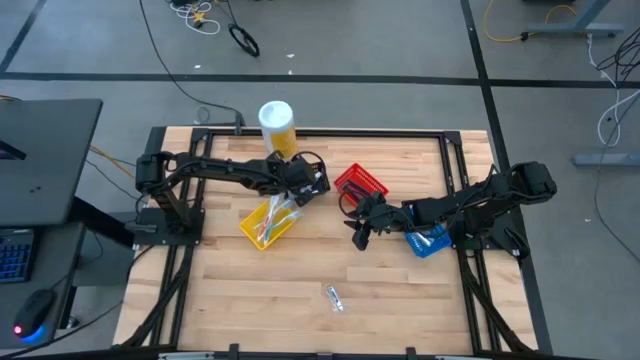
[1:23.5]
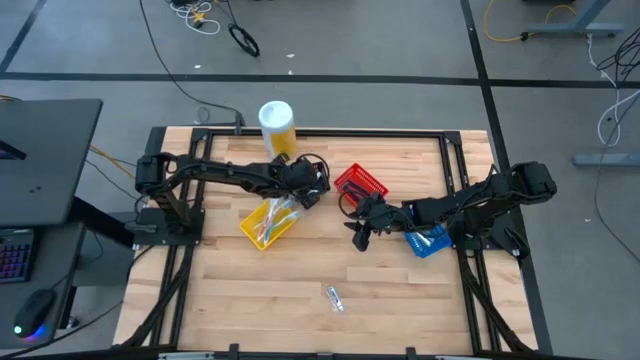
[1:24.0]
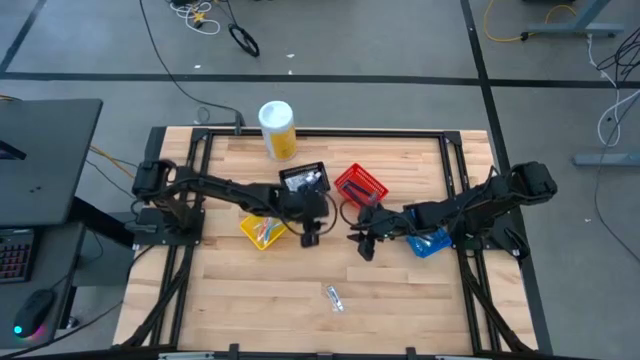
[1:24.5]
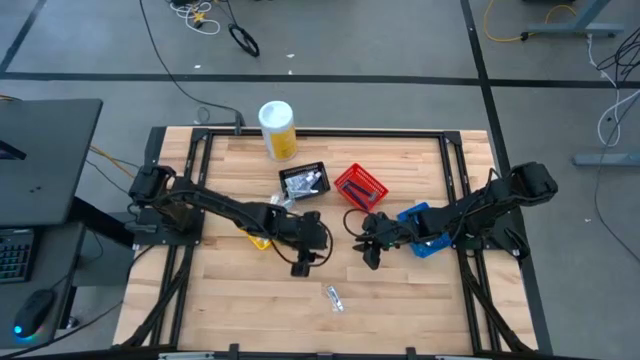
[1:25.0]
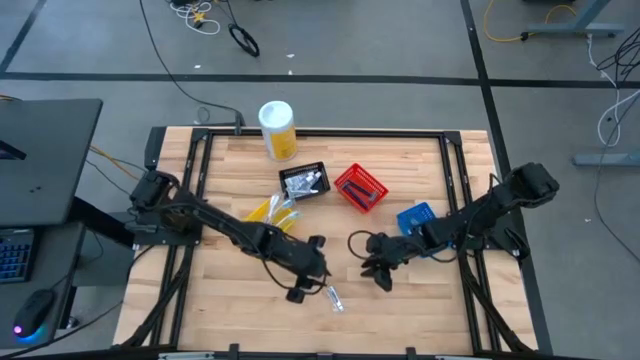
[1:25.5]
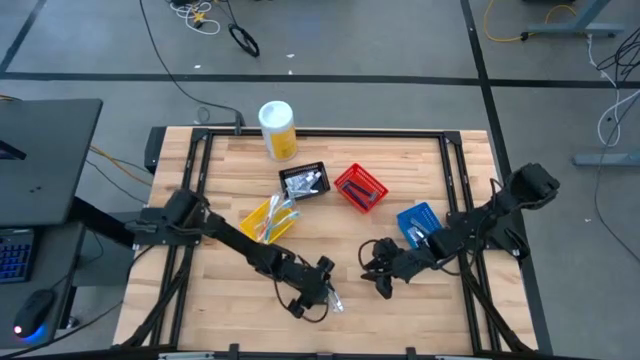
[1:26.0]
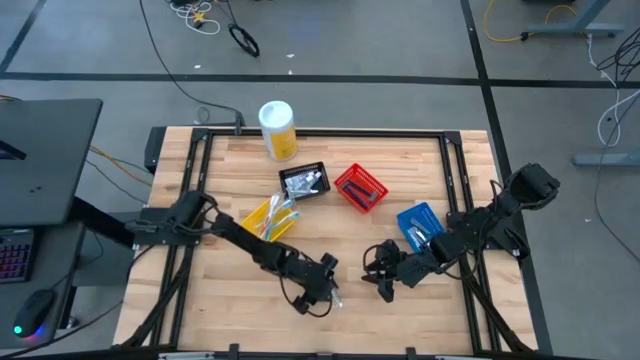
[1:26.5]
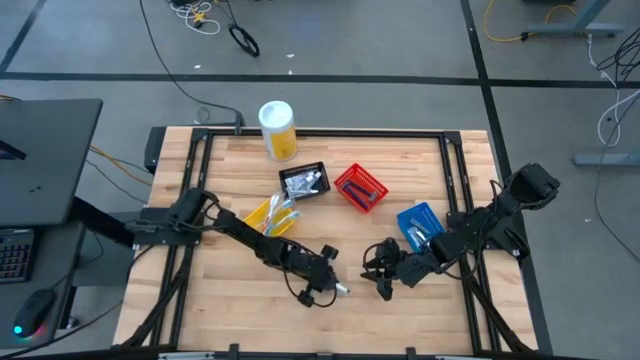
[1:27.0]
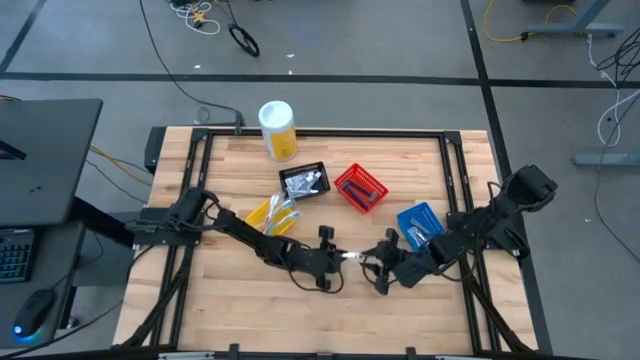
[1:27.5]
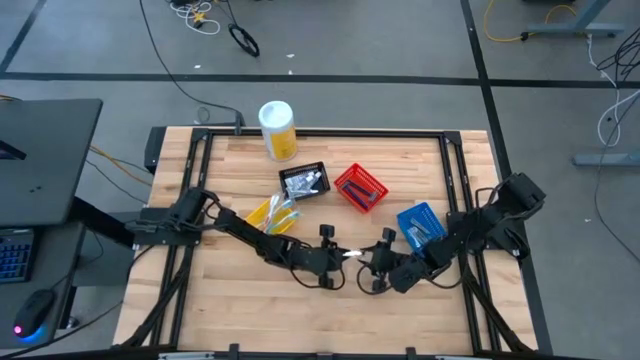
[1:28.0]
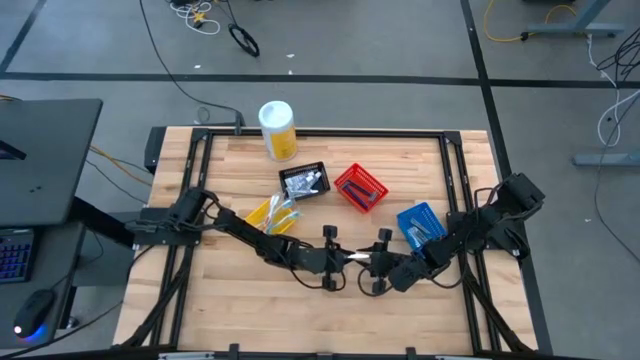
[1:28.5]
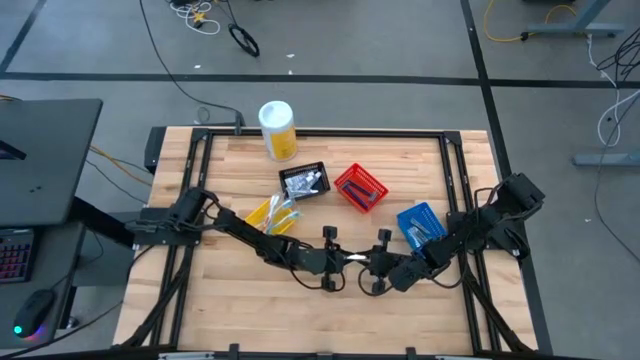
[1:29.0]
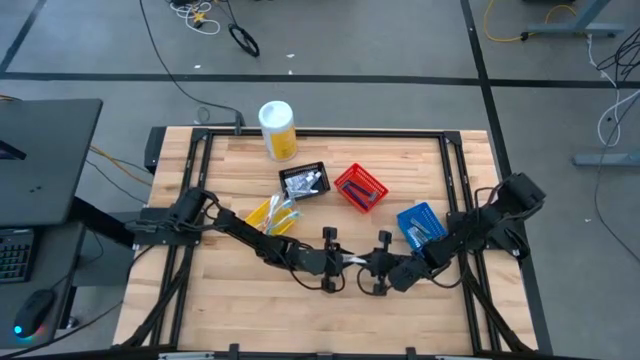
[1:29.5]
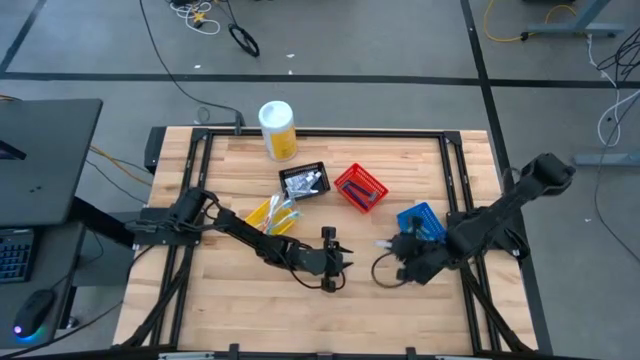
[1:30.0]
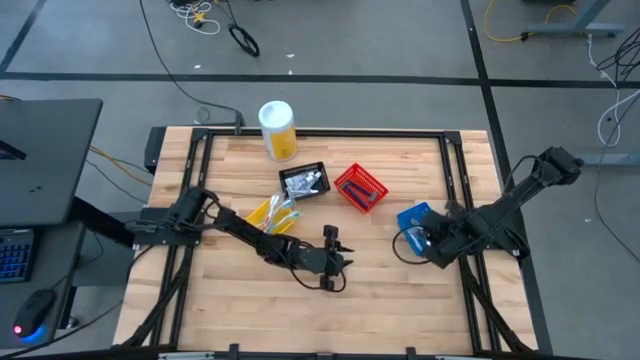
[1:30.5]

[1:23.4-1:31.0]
Task: Pick & Place Travel size toiletries
Put the silver nail cutter into the blue basket

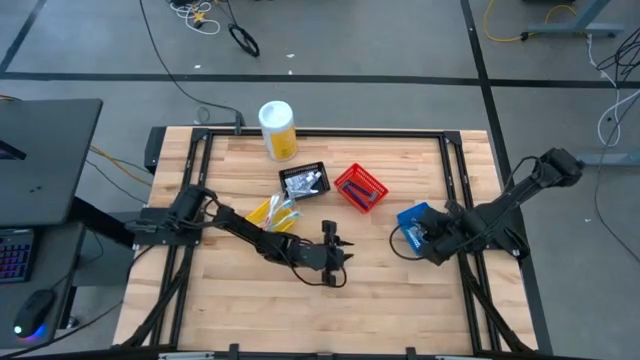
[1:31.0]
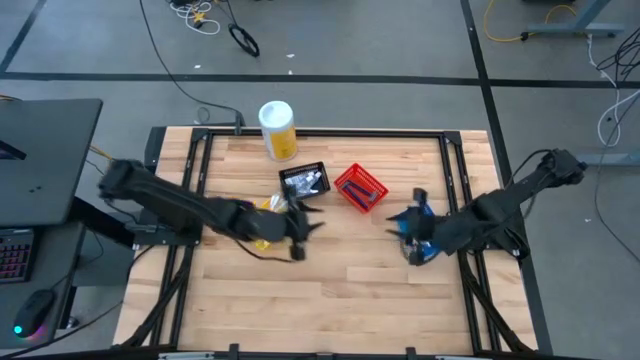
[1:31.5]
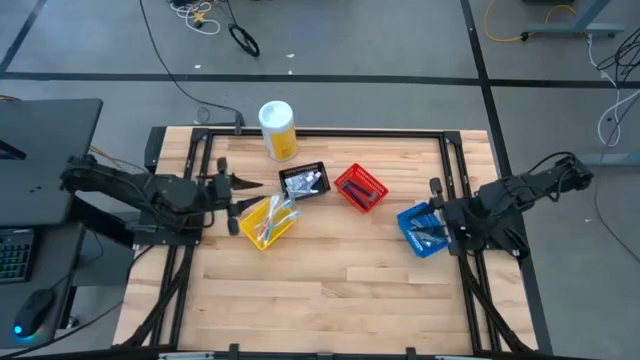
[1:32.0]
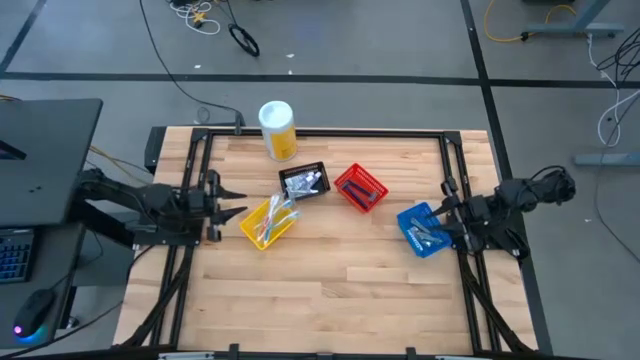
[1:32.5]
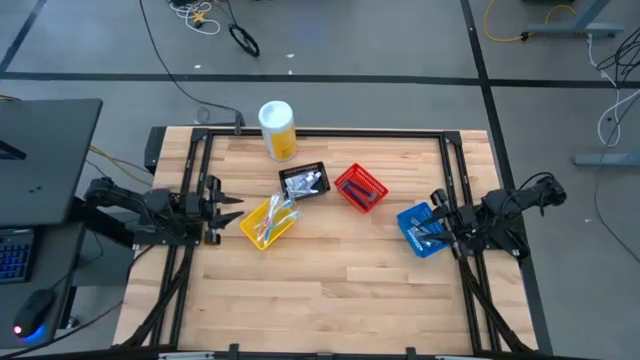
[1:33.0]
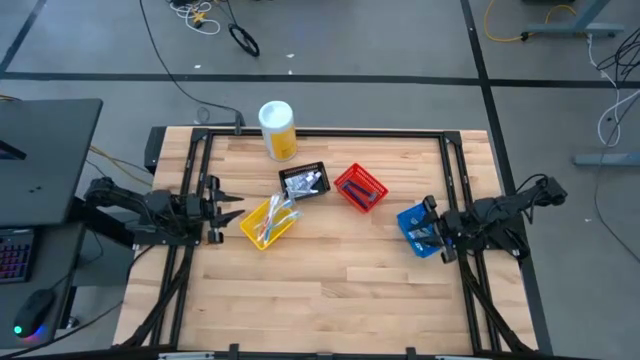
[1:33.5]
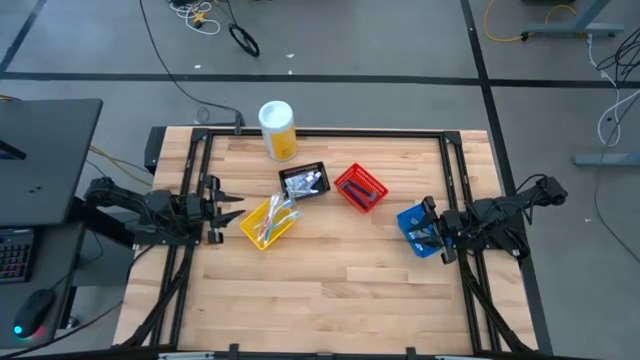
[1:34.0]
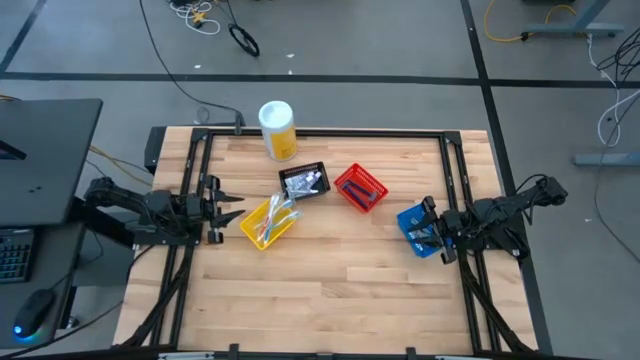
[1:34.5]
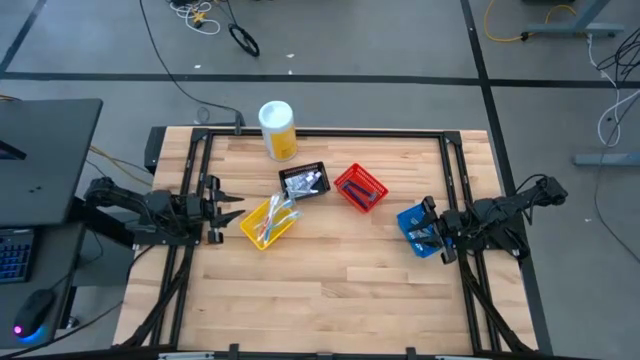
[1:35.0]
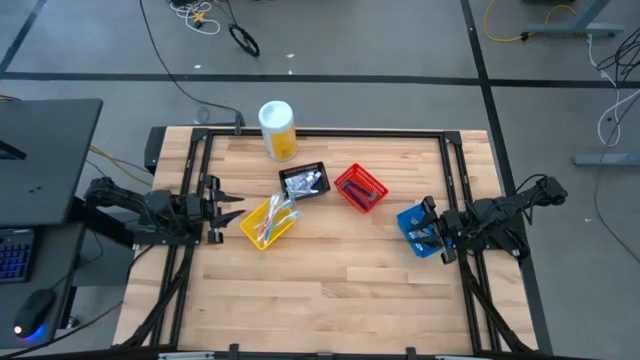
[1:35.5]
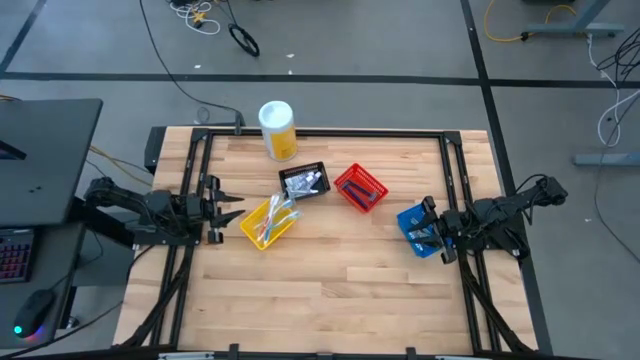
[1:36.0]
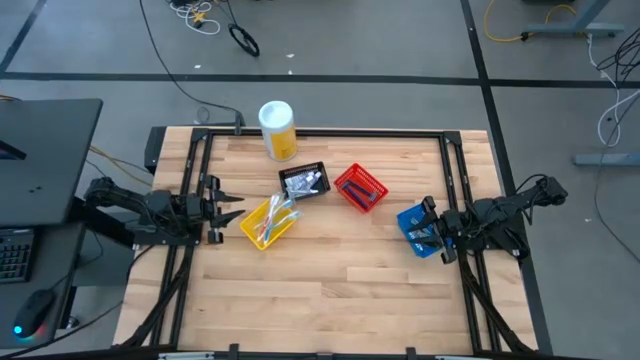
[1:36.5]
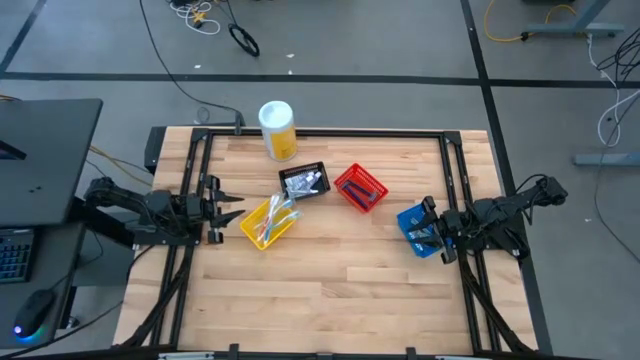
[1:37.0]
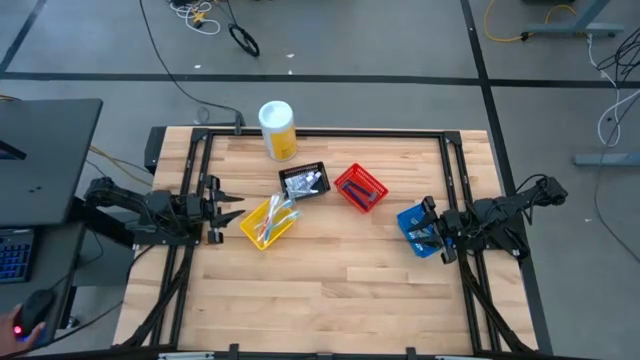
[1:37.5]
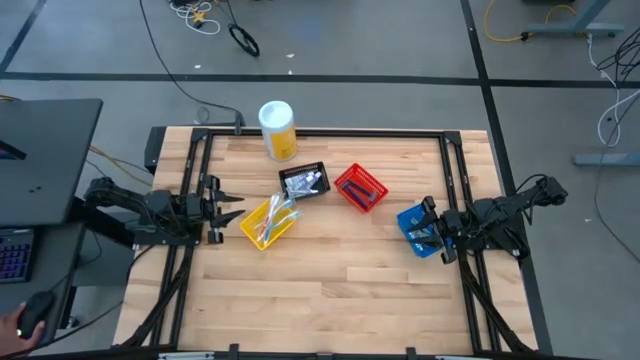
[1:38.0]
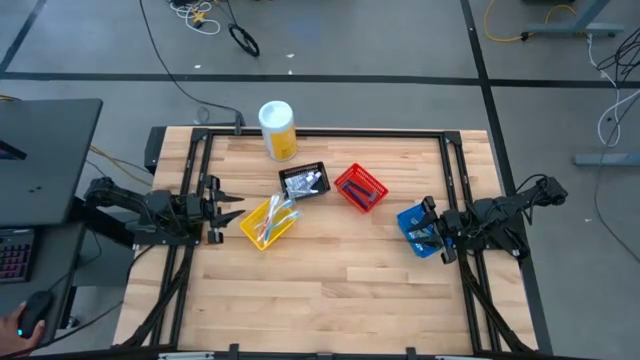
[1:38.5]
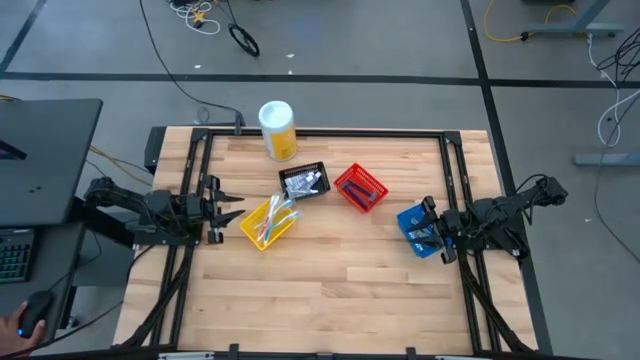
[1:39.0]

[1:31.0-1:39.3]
Return to Home Position

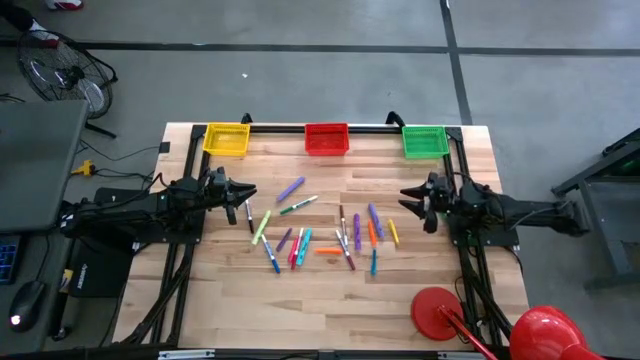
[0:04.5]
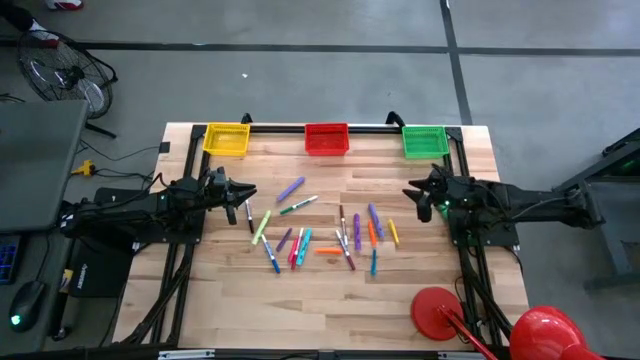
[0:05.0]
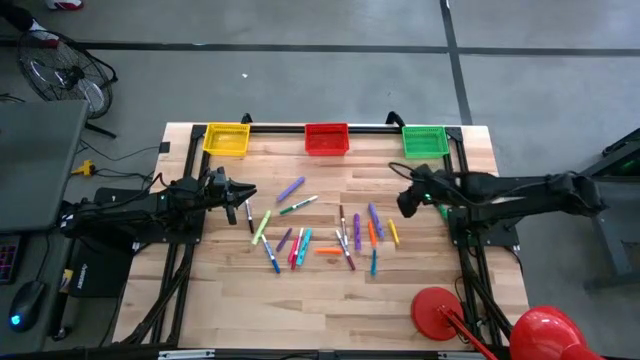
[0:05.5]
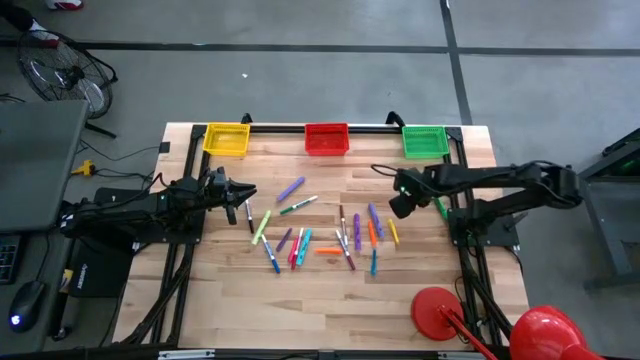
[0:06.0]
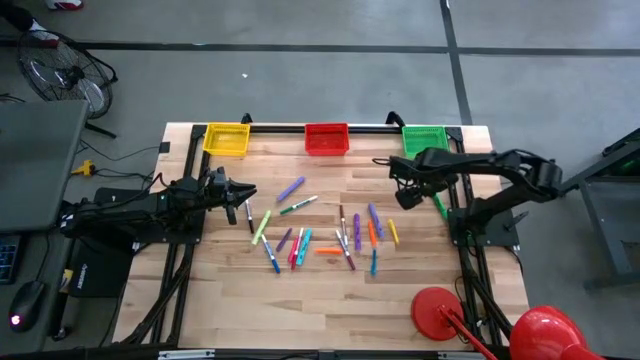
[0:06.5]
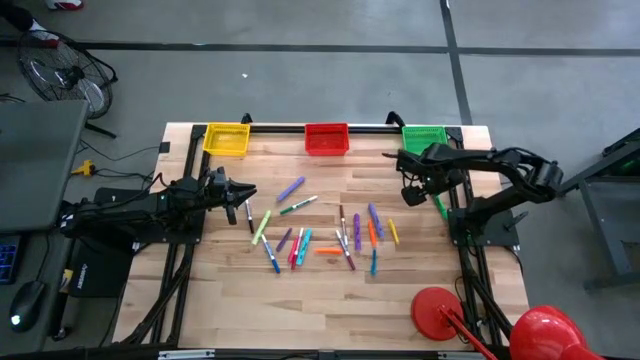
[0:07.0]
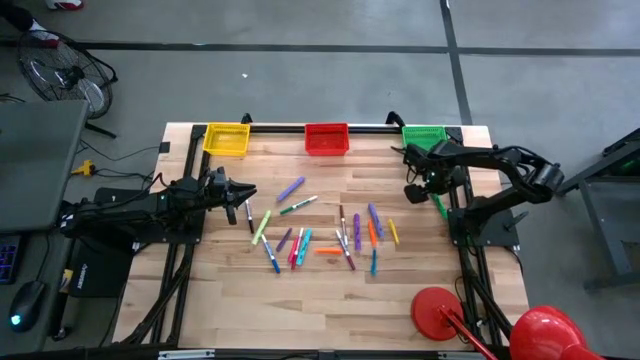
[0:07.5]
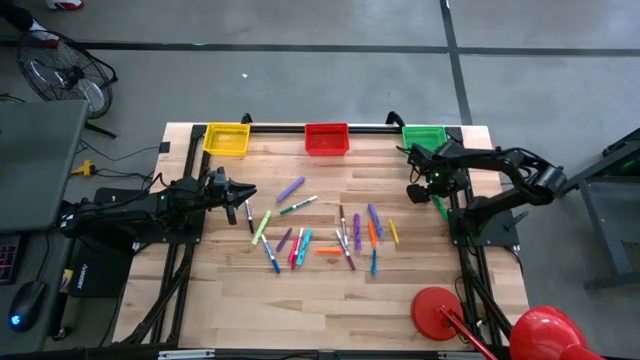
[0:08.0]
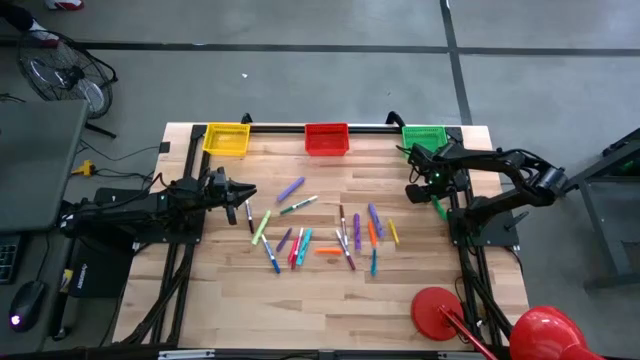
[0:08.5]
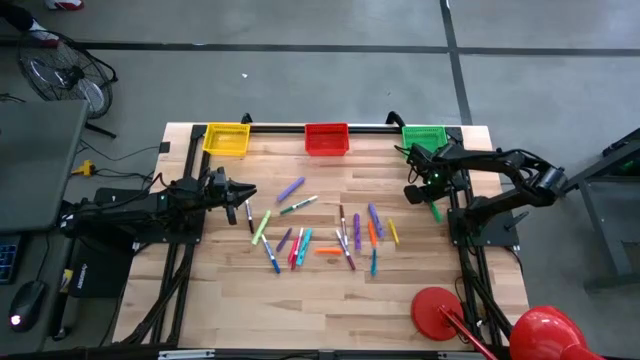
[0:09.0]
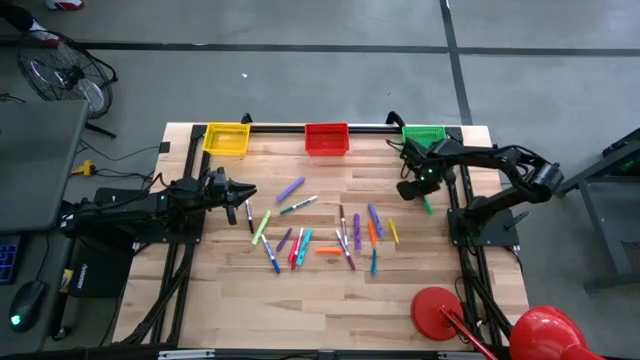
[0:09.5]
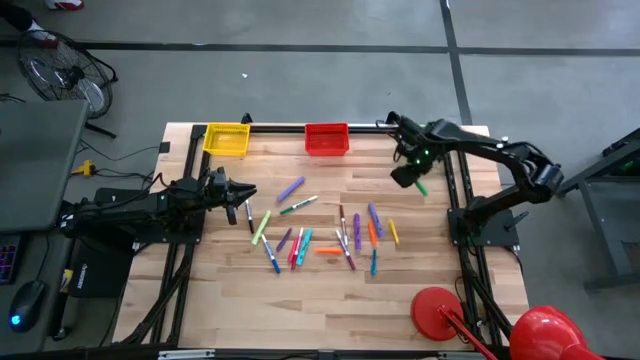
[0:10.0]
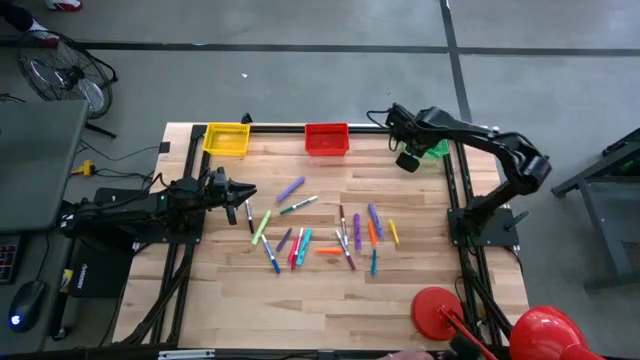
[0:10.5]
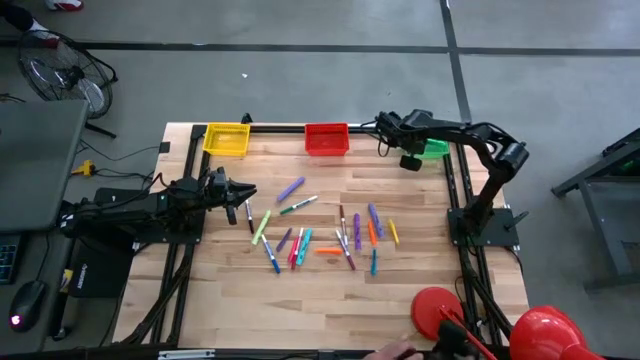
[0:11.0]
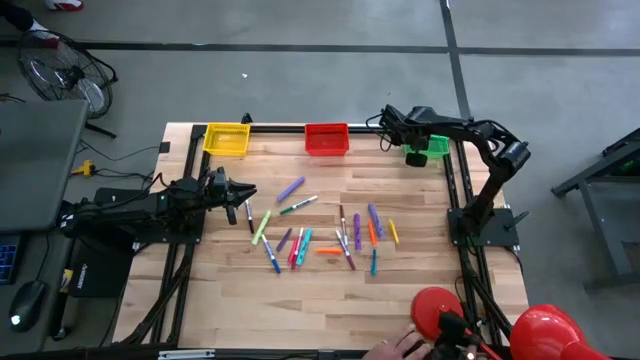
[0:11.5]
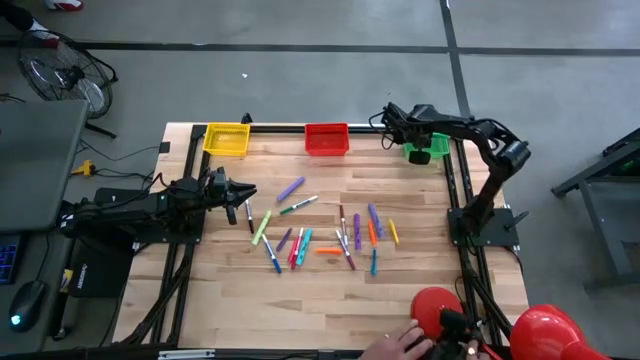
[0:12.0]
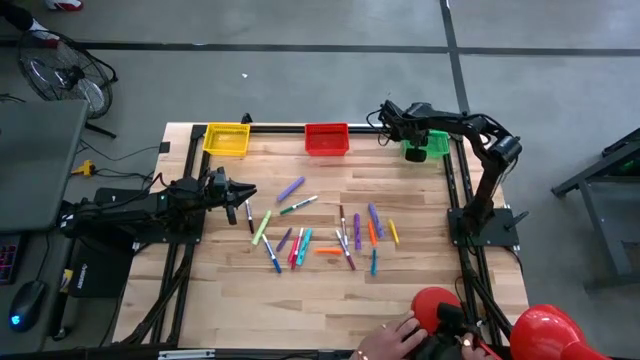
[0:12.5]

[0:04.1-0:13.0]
Task: Pick & Place Markers
Put the green highlighter into the green bin
